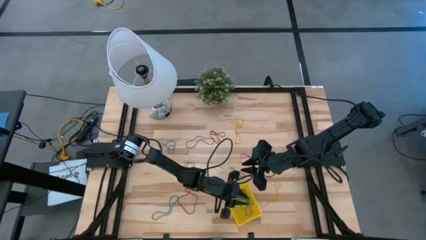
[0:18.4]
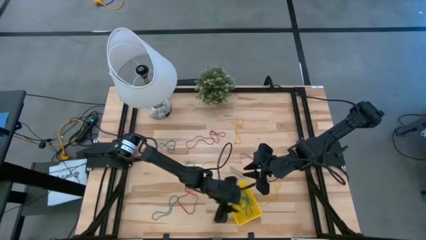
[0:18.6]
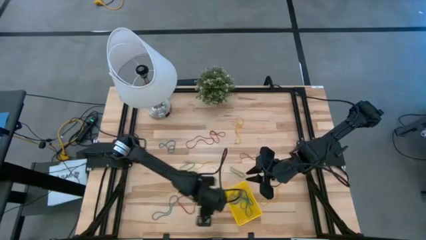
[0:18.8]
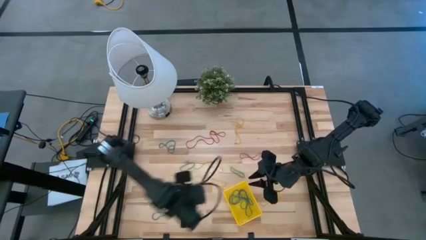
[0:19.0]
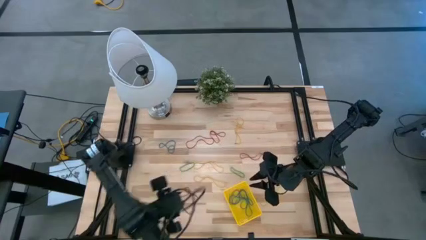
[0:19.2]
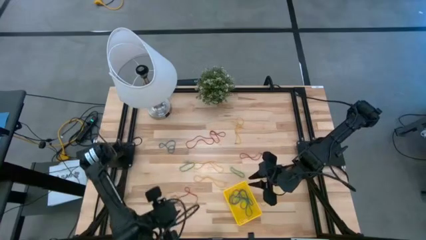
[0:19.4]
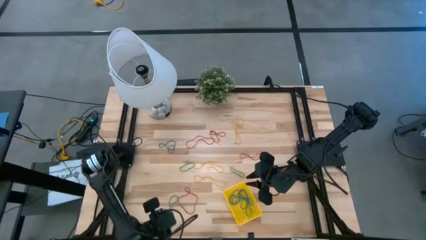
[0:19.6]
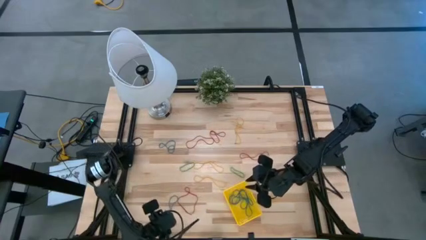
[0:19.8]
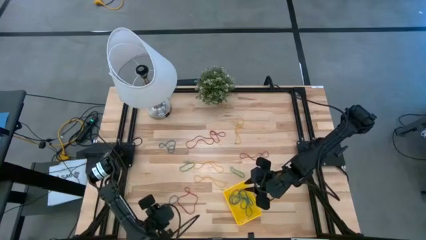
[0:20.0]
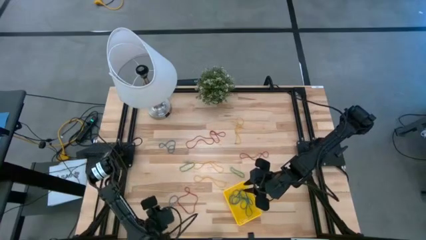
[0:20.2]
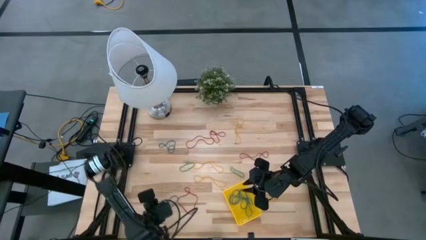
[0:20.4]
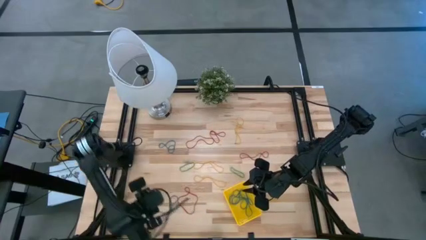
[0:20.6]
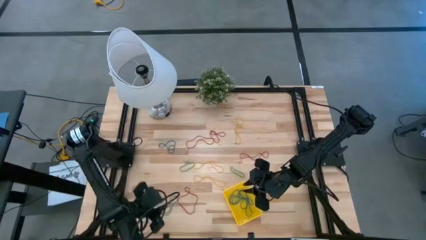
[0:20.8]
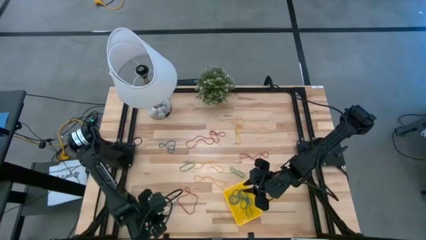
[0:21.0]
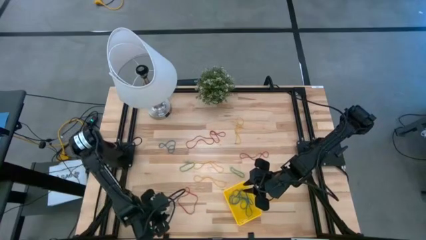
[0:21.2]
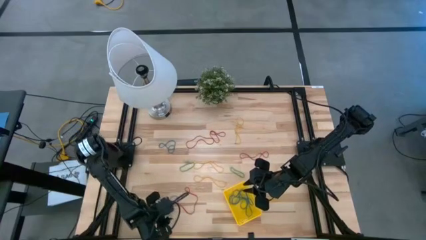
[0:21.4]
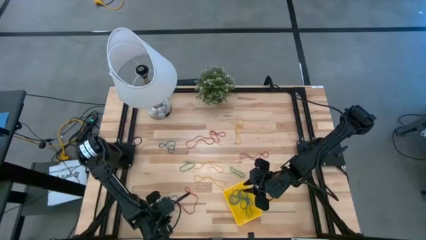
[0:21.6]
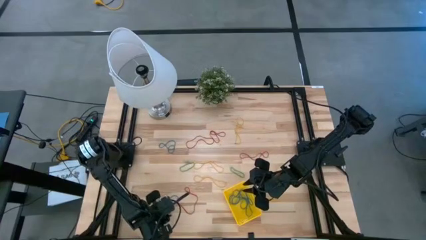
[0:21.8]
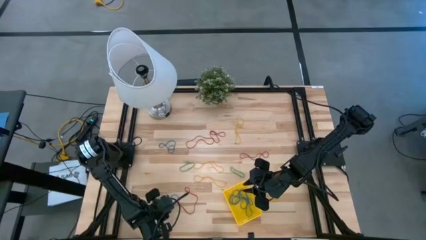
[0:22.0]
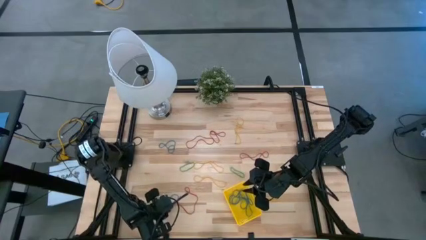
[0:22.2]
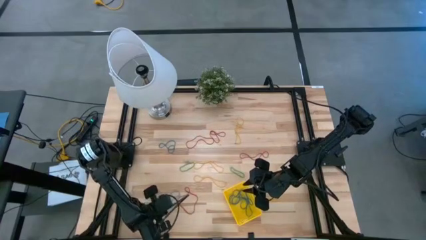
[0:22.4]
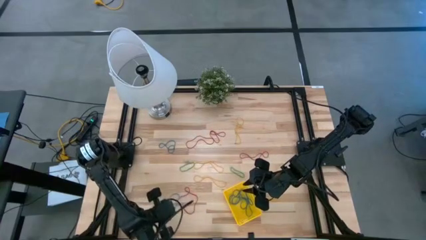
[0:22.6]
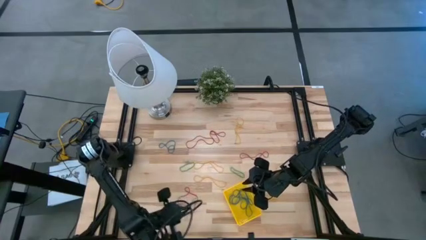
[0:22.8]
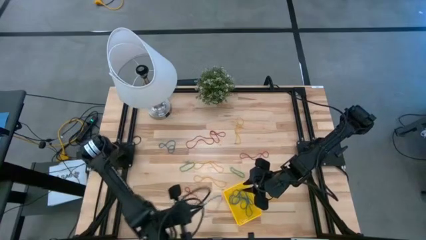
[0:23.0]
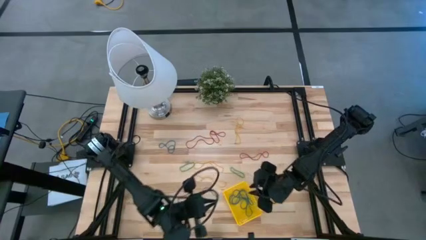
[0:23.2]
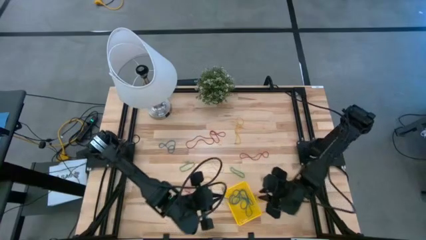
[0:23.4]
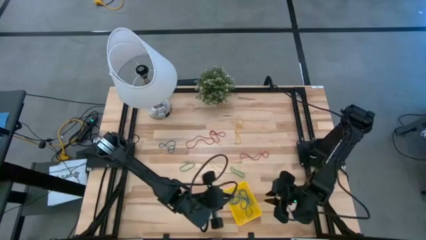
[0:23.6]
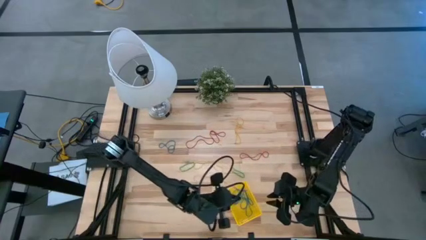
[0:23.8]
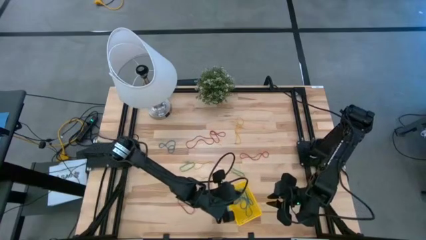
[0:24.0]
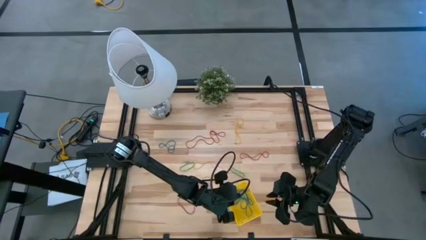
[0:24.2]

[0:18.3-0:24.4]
Task: Pick and place items into bin
Put the bottom blue rubber band into the bin

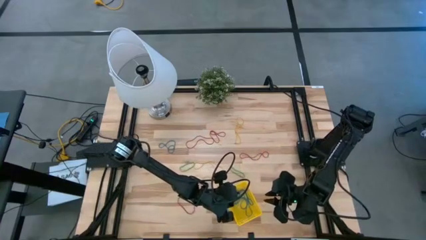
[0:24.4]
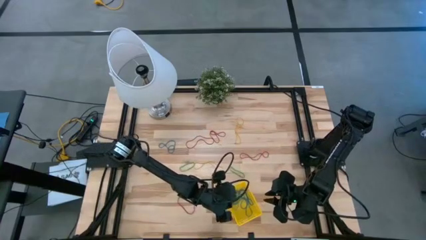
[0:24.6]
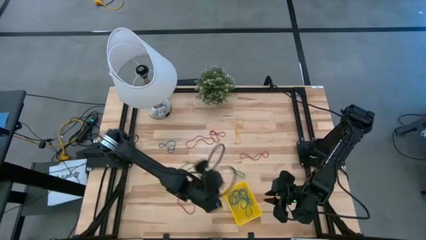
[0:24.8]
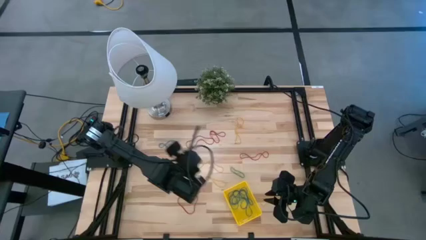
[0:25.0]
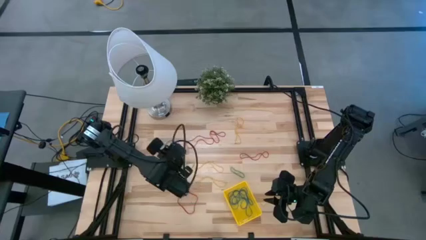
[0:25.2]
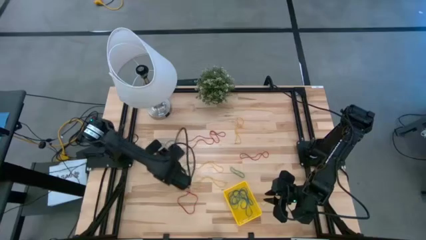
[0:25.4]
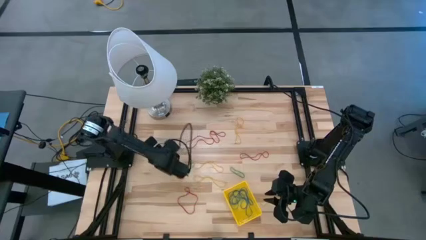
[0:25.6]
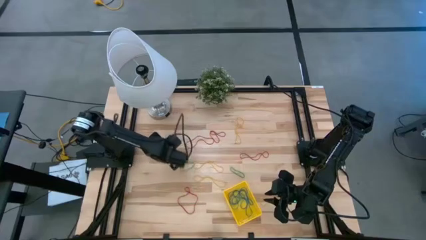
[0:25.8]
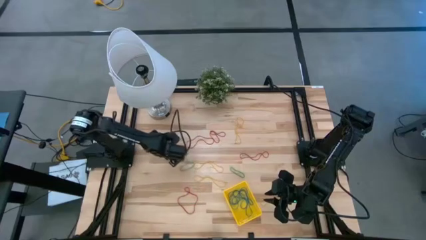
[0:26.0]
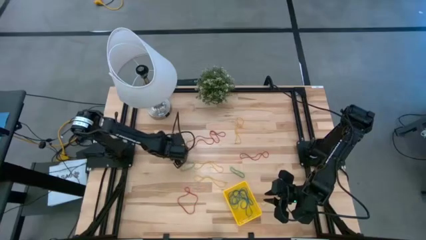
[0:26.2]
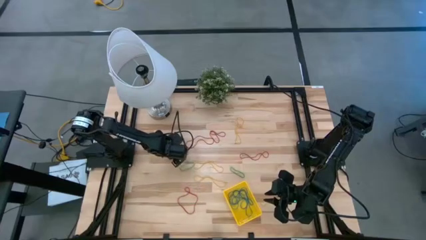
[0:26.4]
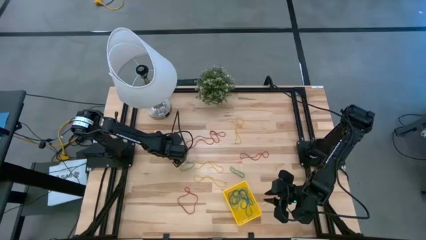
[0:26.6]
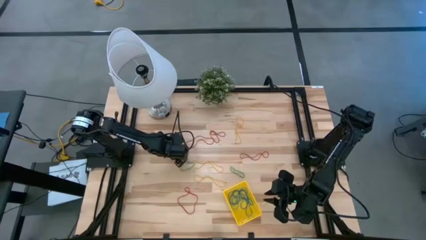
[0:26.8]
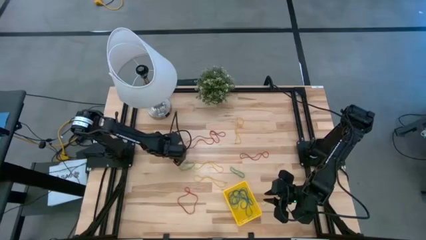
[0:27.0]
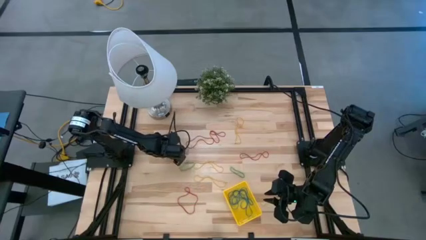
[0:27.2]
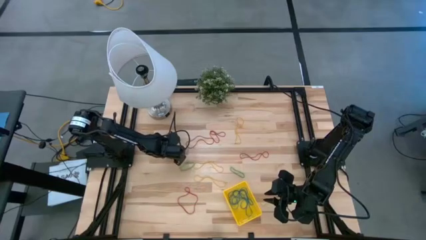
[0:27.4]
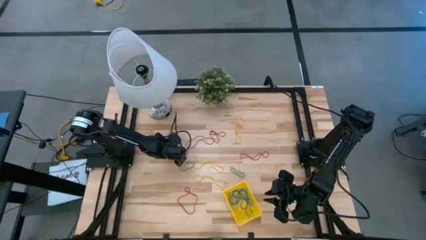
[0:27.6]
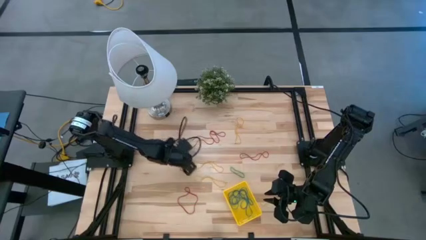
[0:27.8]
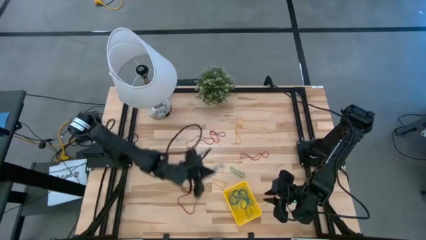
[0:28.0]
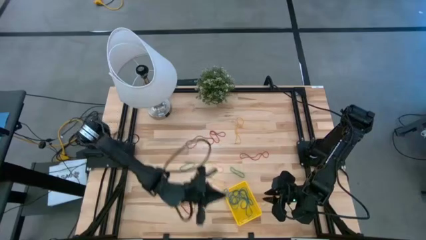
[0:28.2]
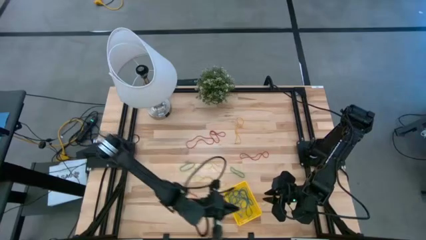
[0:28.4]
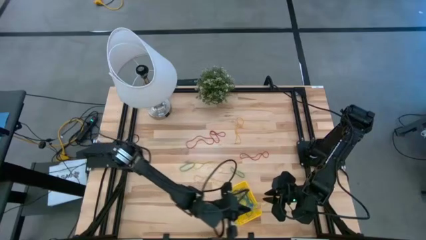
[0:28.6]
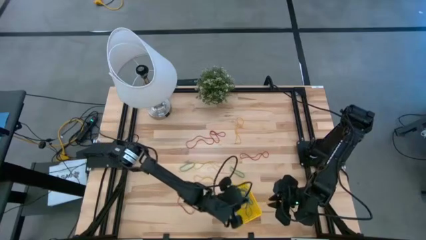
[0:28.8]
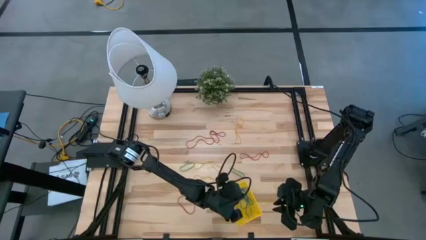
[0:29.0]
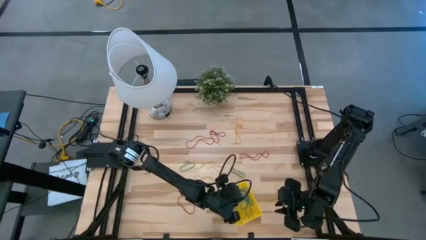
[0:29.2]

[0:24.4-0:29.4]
Put the blue rubber band into the bin

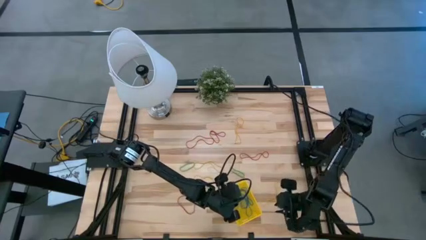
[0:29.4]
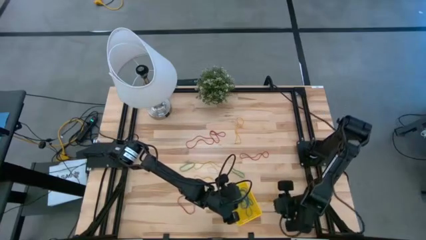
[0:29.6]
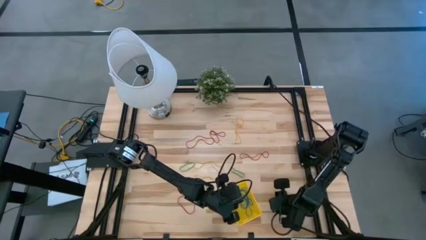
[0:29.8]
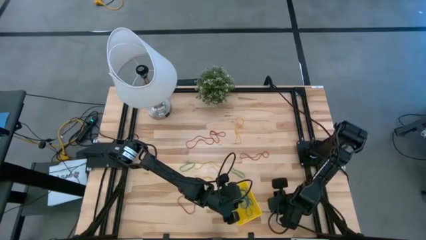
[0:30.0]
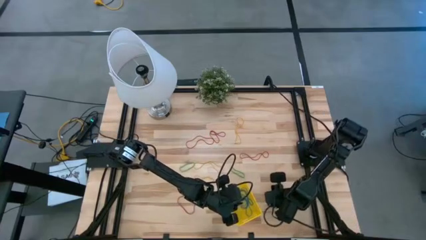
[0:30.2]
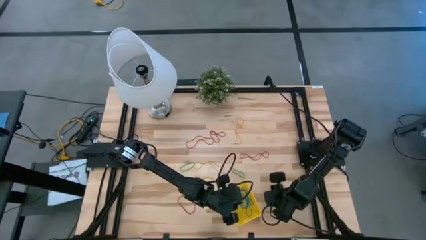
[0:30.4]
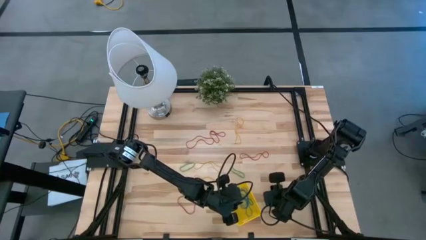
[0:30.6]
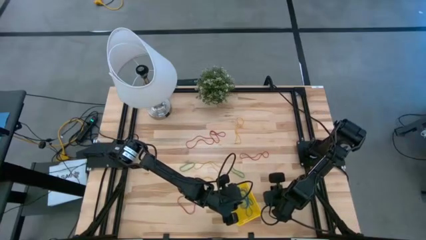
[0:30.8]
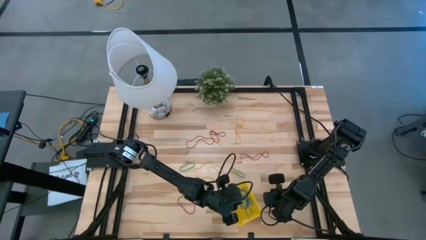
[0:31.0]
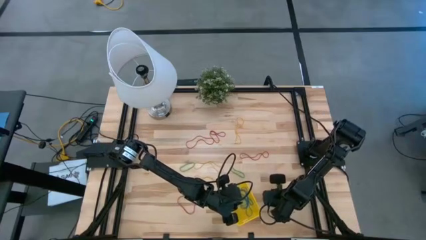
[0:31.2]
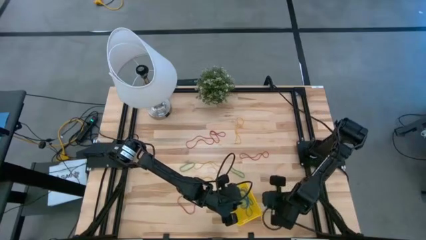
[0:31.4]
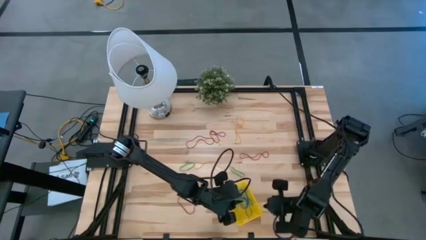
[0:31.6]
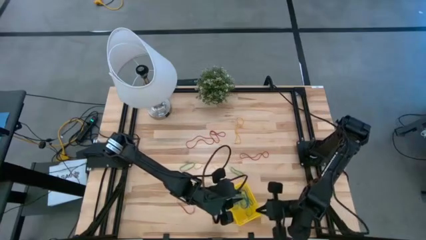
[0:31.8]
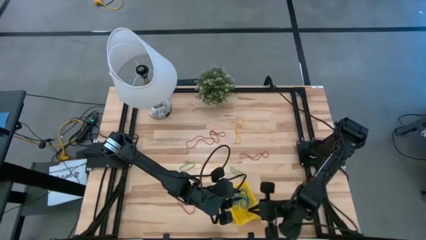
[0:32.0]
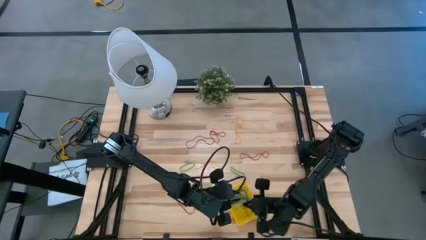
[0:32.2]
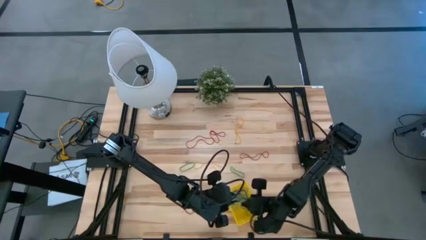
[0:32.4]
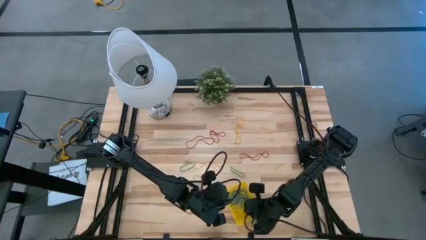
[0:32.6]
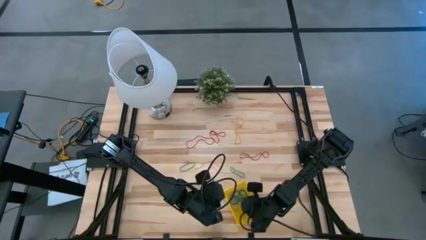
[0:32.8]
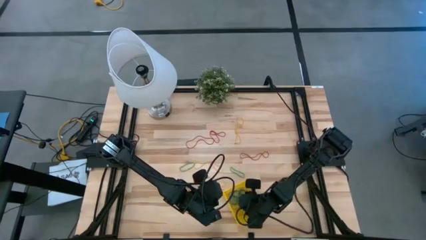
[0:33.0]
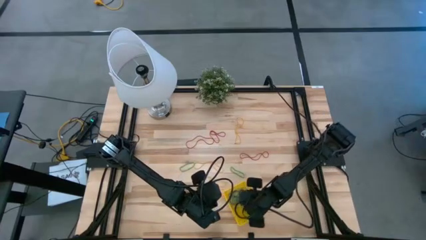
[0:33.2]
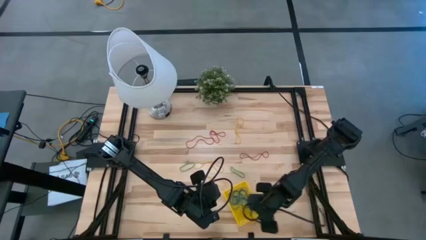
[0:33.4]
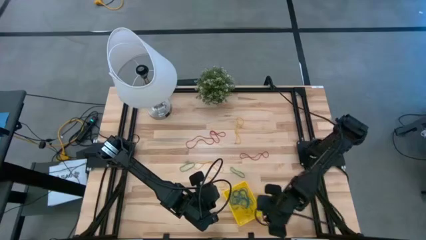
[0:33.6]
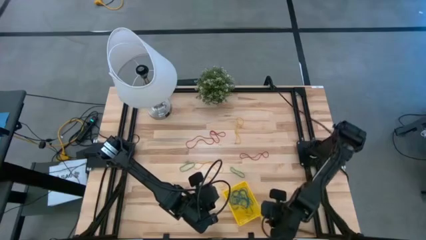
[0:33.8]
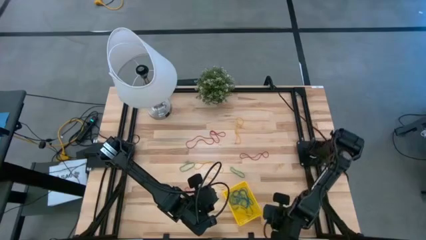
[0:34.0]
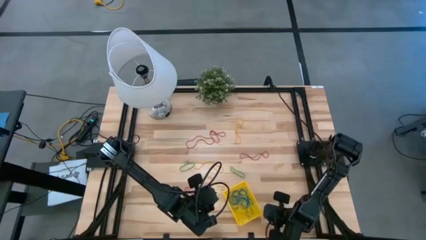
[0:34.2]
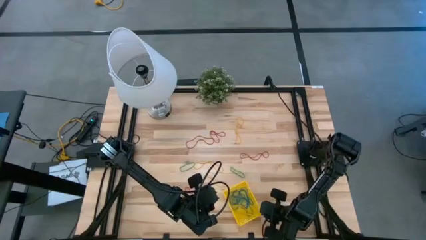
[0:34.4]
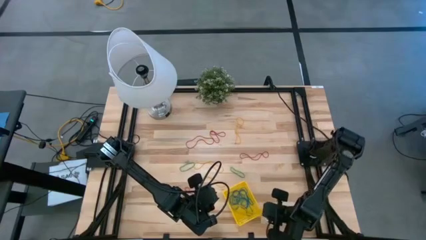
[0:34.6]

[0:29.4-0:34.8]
Put the yellow rubber band into the bin
